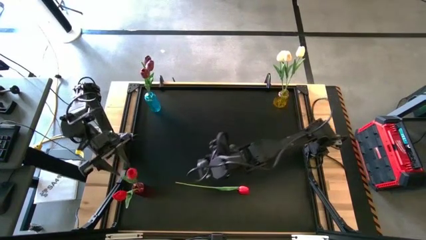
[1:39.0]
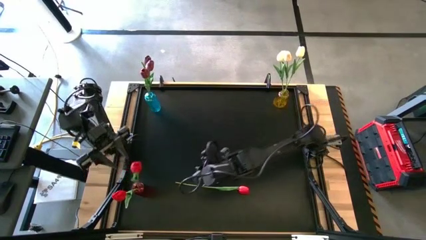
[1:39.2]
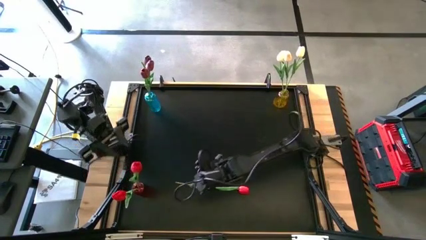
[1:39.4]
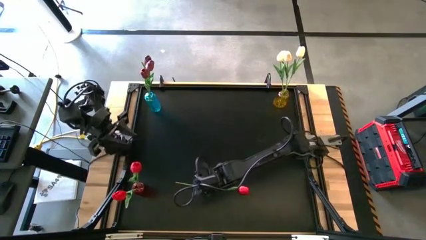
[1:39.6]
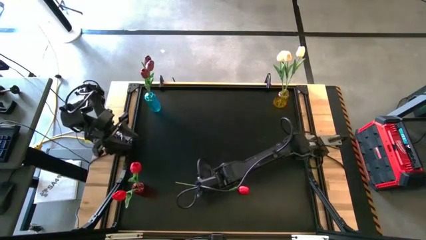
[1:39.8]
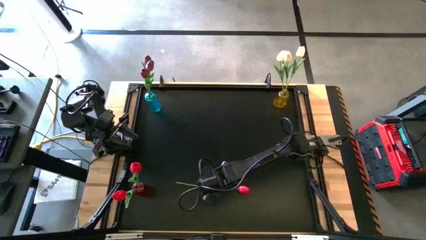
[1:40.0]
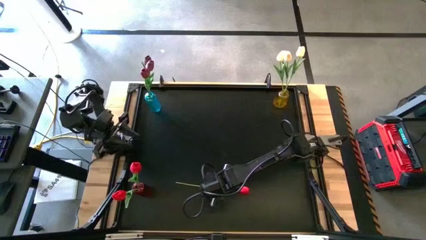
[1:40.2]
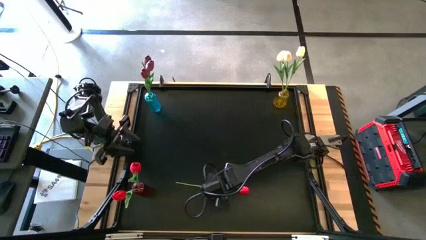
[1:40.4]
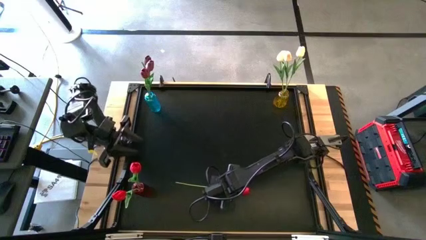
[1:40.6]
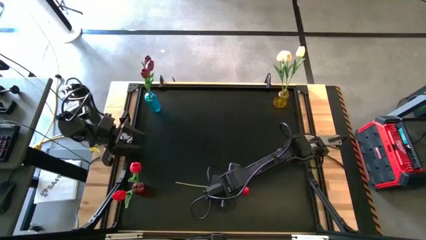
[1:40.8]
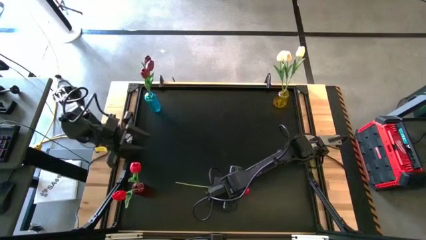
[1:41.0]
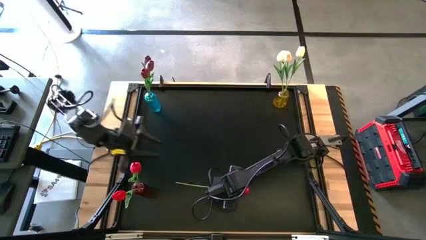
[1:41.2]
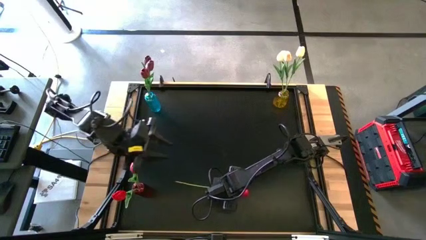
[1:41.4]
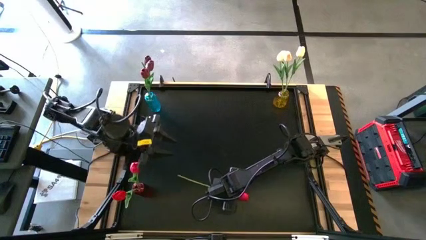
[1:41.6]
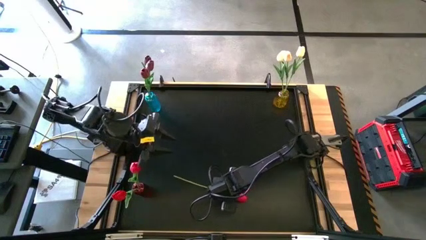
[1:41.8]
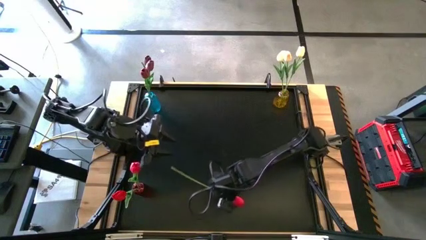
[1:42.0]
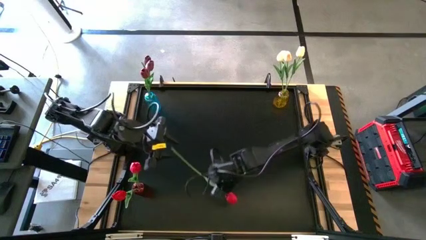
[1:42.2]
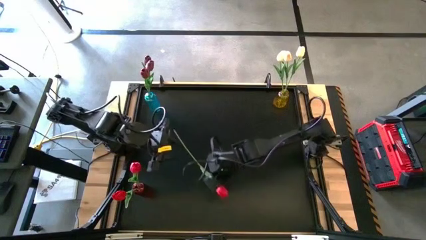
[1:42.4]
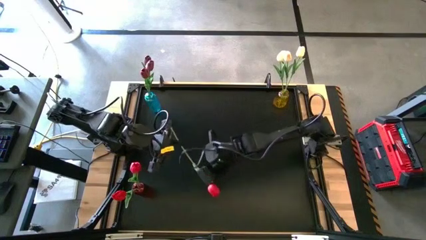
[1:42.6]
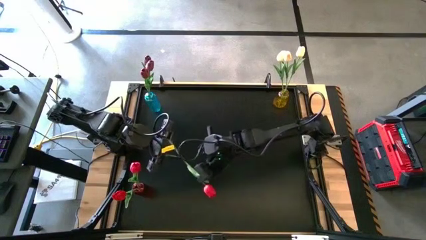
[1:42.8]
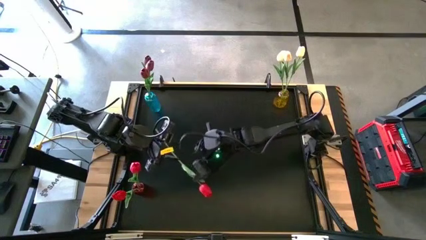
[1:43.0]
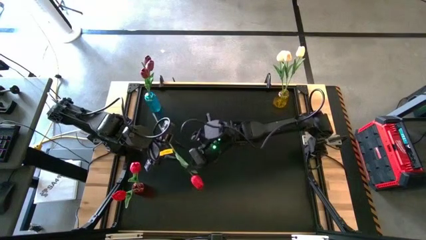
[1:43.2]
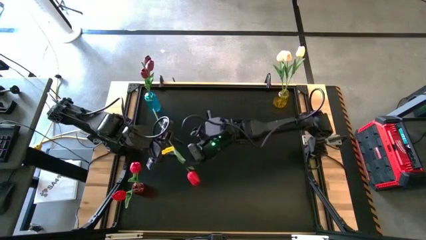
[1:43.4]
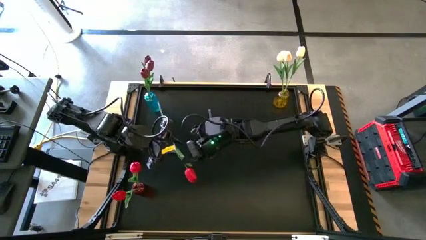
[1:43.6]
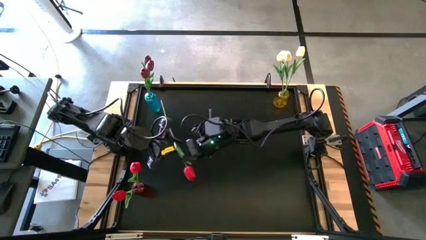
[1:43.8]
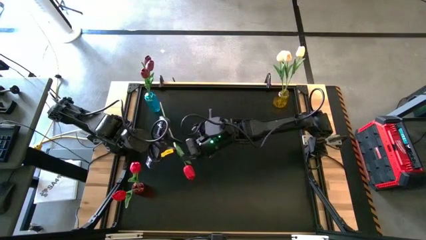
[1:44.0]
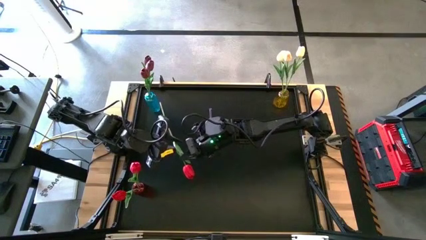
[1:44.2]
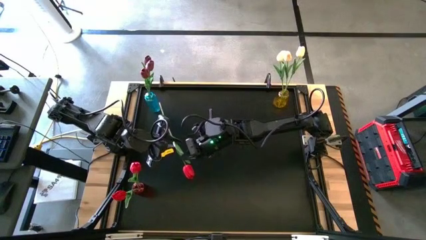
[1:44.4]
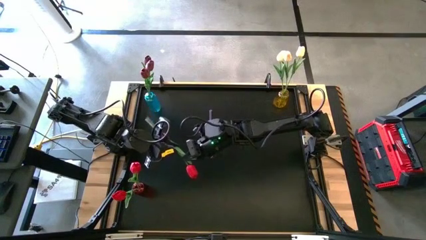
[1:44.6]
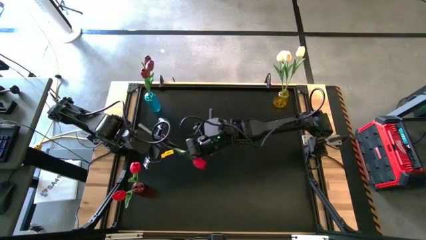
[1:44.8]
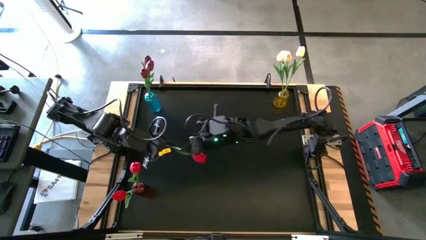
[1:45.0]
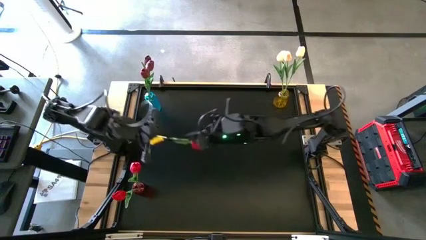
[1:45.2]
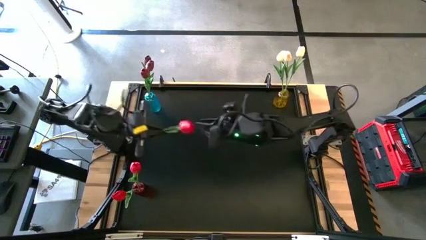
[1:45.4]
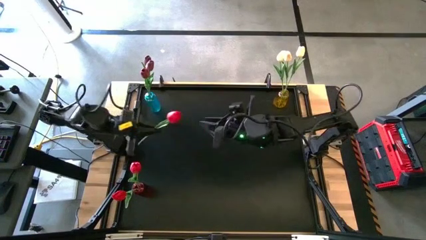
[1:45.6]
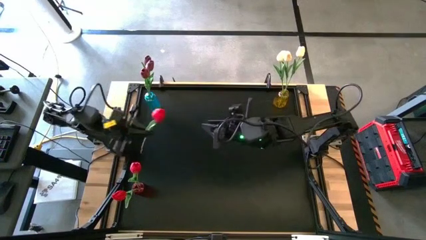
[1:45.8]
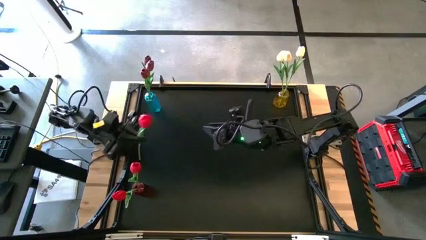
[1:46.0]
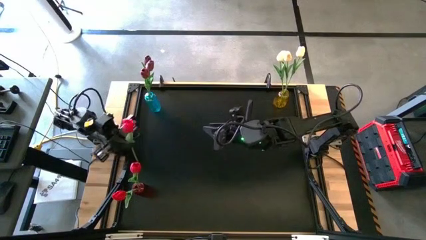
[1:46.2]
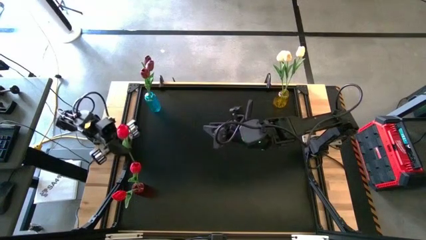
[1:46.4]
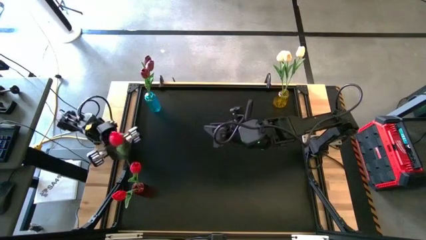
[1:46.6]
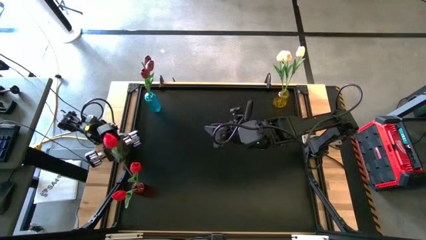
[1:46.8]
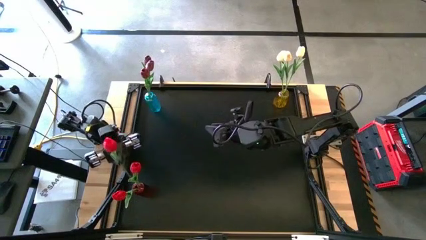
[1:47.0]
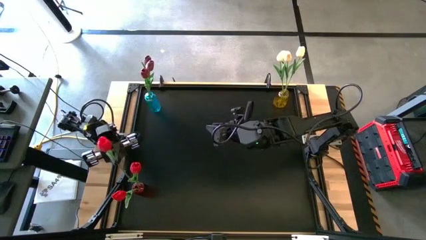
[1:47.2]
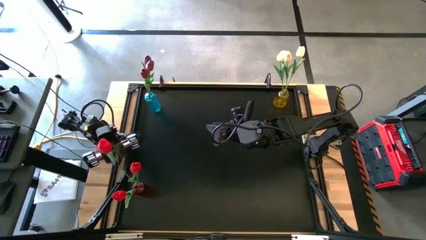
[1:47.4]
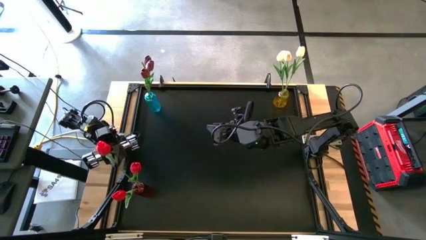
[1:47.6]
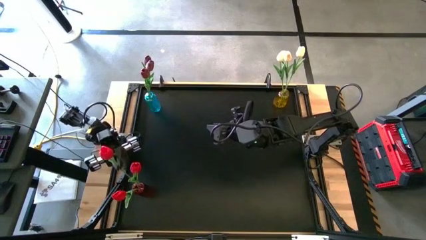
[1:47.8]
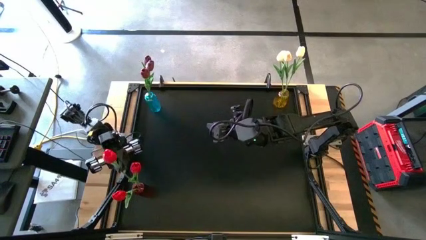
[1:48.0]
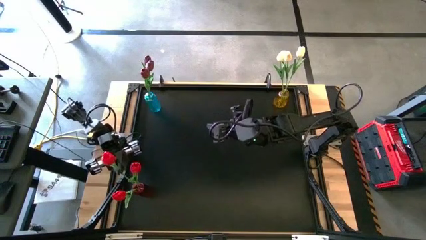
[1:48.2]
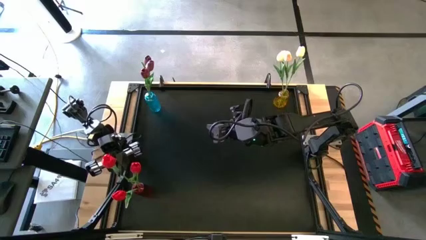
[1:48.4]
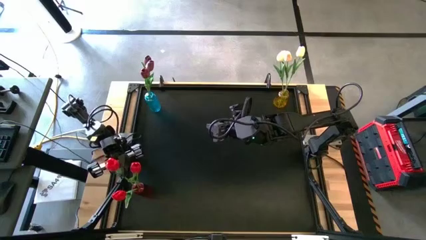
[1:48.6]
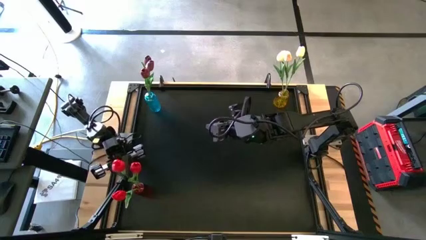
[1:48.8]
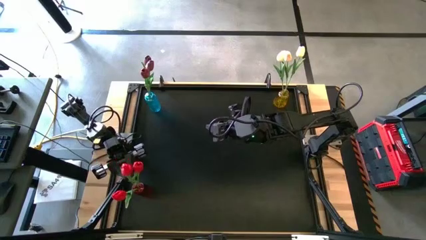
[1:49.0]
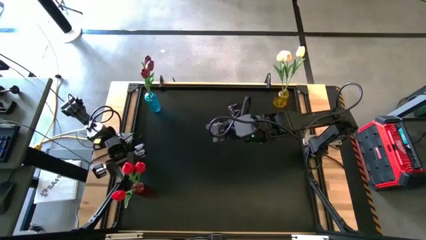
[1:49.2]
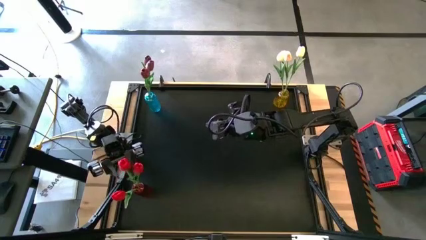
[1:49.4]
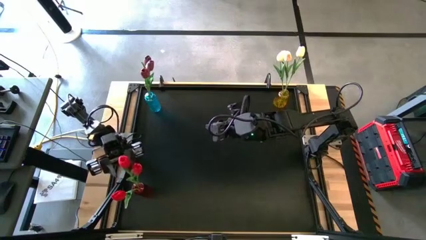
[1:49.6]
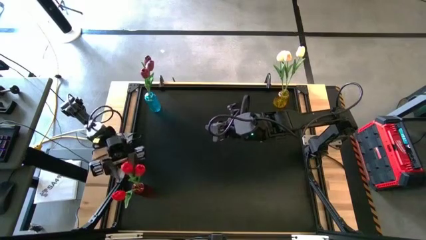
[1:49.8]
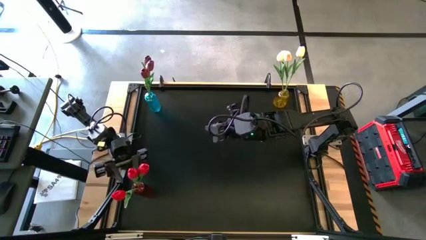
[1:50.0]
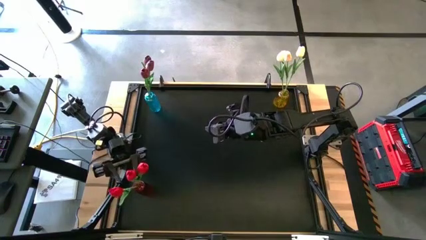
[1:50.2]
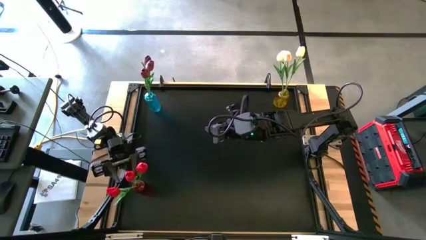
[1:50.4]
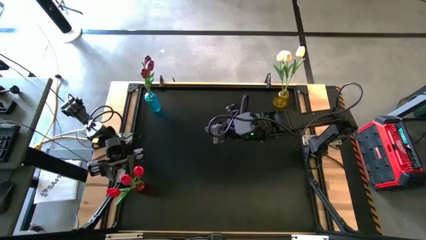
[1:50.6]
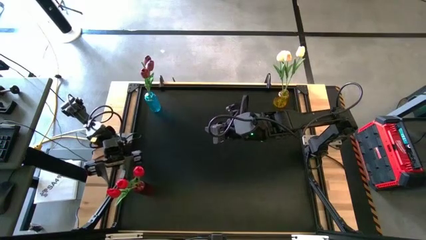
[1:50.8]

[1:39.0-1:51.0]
Task: Sort flowers into vase by color
Put the red flower into the red vase

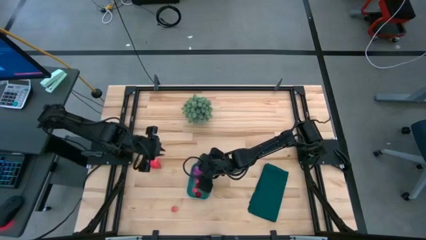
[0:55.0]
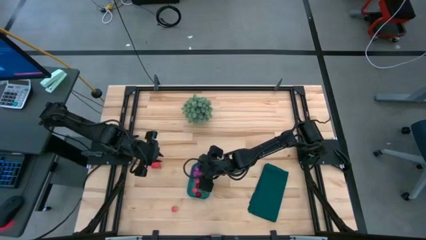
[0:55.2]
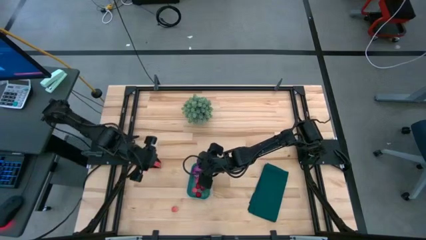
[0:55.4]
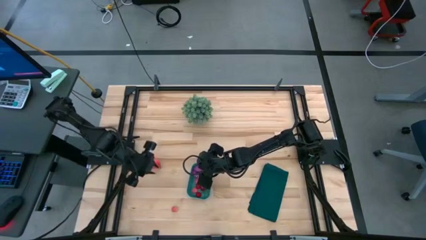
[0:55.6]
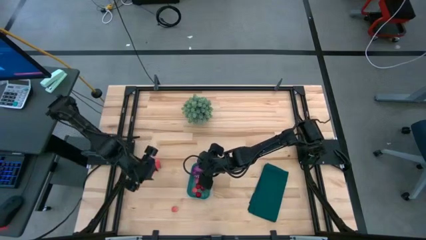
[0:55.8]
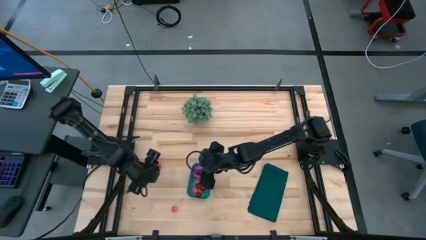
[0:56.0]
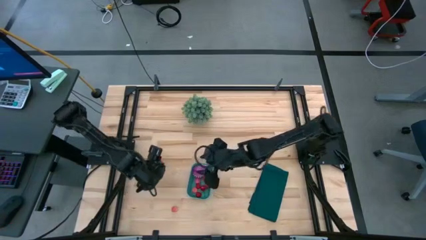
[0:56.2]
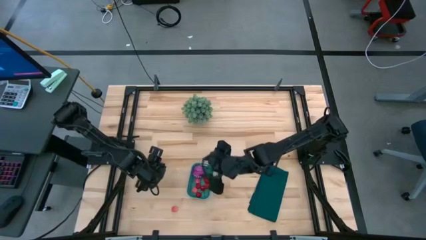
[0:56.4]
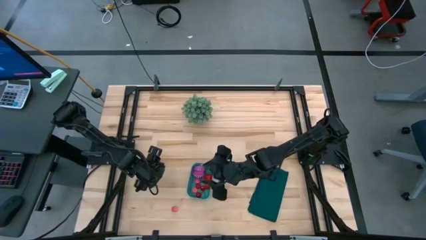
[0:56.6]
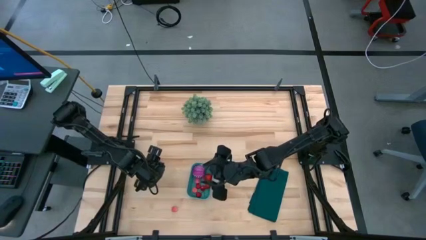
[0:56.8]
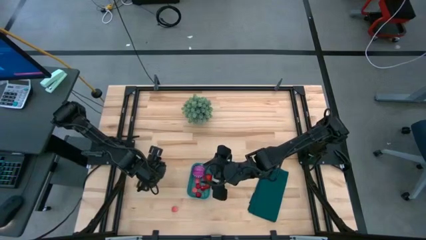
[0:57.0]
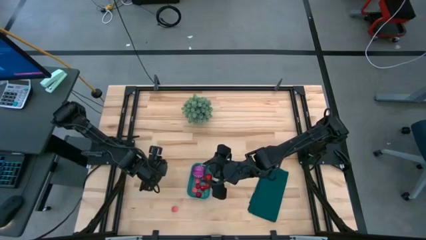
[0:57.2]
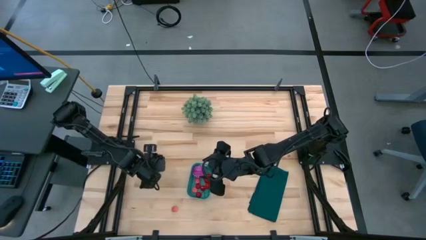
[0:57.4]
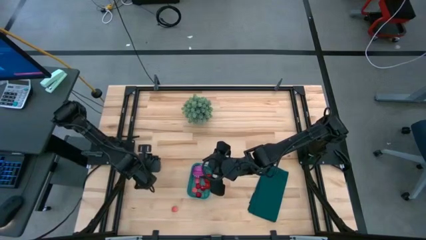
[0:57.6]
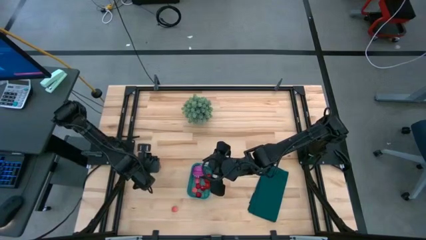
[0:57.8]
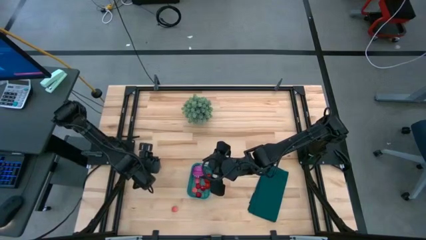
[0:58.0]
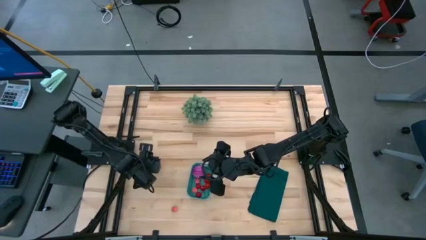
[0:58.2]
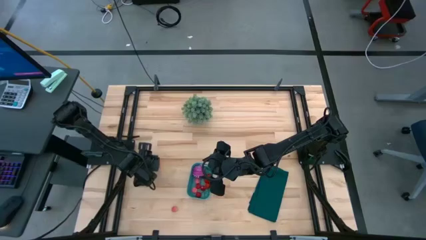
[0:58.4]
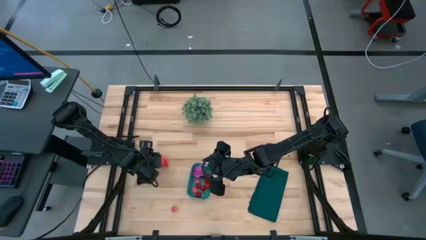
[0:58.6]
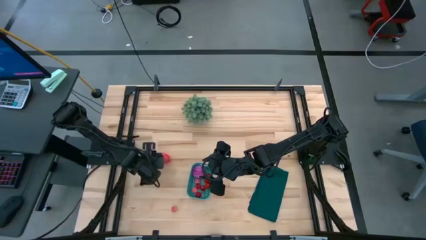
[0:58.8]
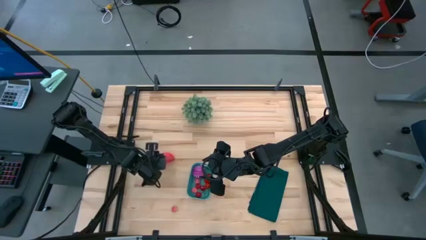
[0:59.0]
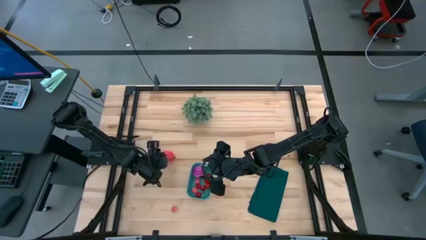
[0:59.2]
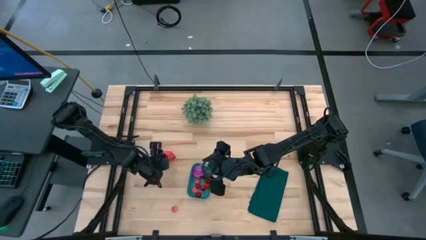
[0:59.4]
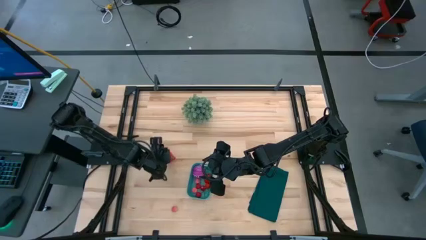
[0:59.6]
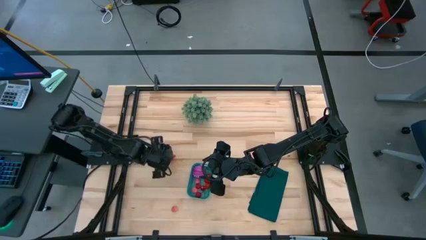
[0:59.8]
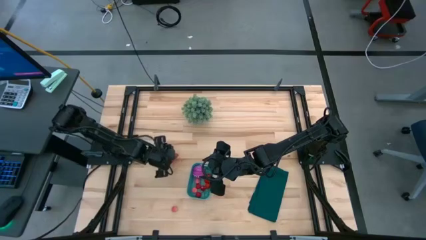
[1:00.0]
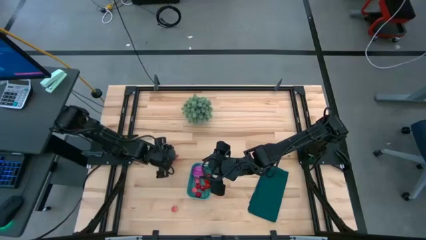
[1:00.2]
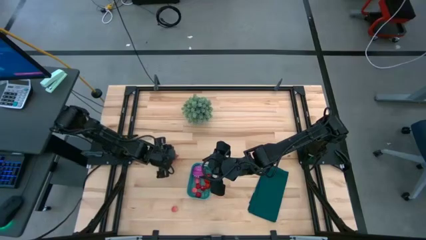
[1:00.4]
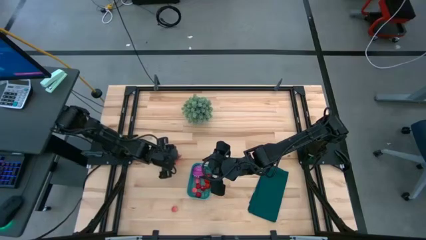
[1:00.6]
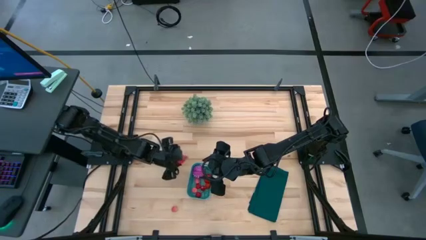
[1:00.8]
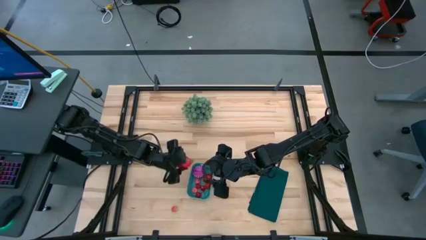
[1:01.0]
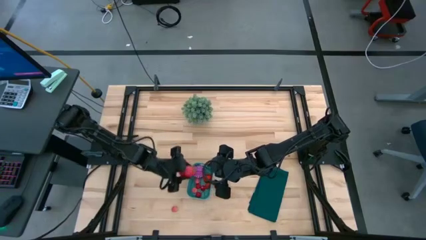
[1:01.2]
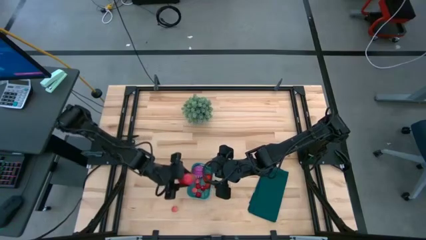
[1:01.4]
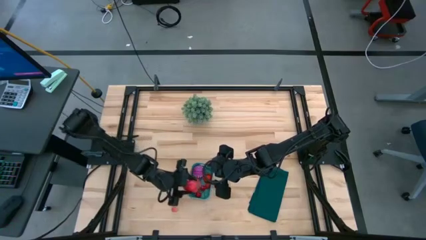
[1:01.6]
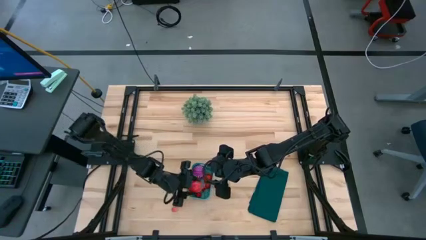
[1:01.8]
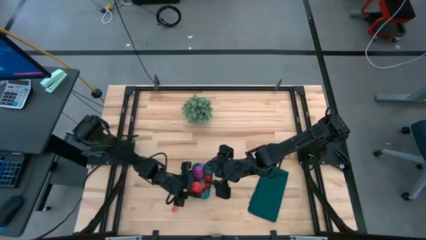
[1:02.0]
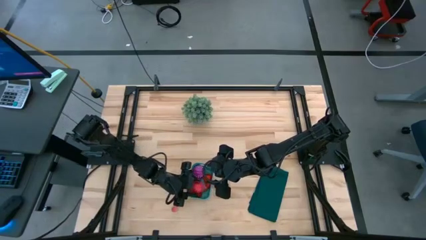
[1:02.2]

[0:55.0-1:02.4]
Task: Pick and placing Produce into tupperware
Put the red dragon fruit into the green bin
